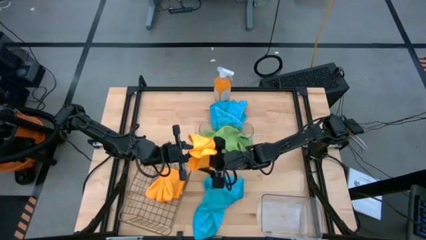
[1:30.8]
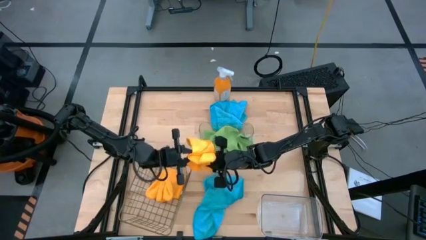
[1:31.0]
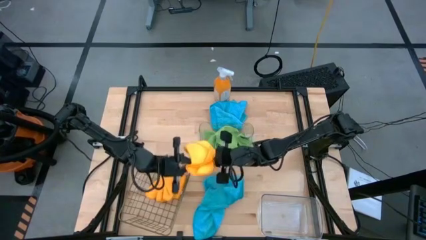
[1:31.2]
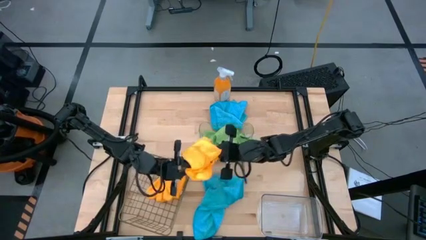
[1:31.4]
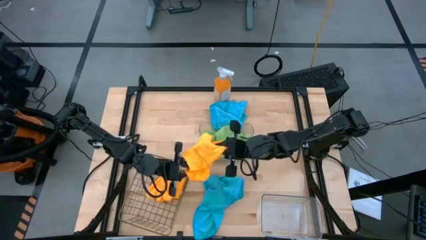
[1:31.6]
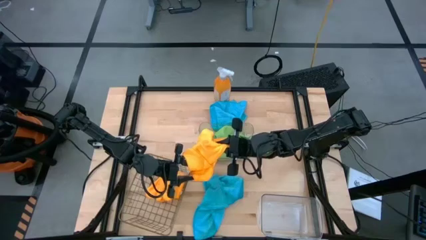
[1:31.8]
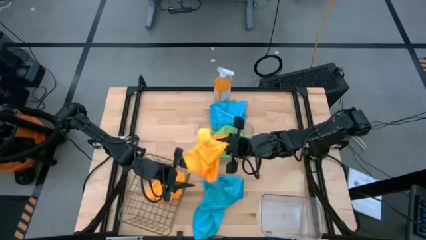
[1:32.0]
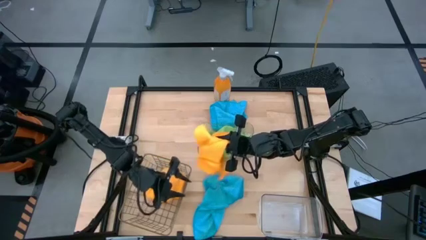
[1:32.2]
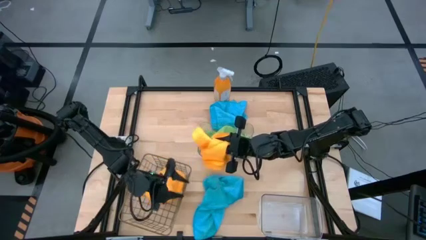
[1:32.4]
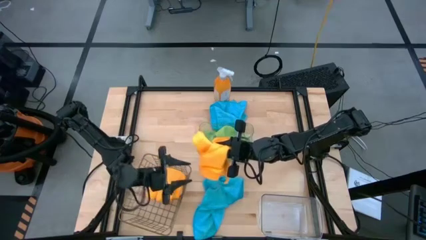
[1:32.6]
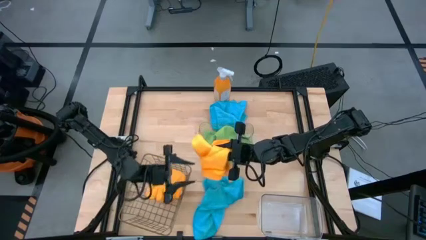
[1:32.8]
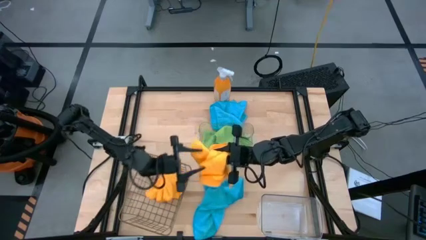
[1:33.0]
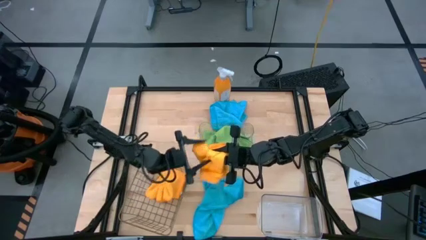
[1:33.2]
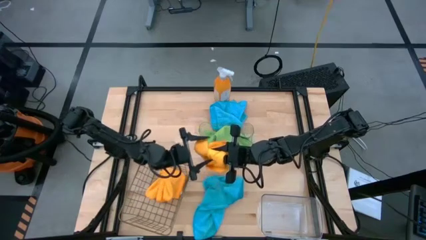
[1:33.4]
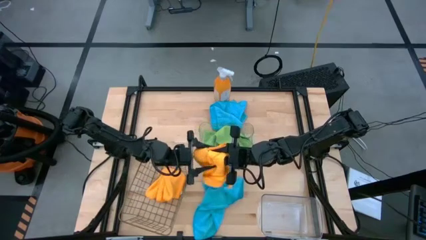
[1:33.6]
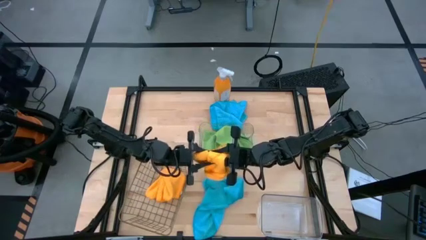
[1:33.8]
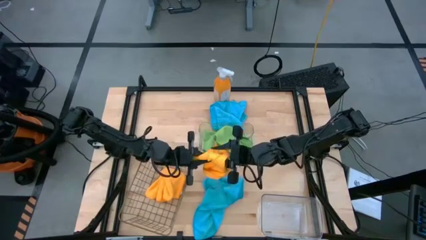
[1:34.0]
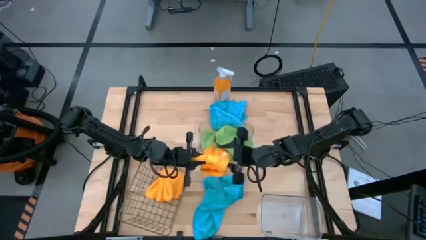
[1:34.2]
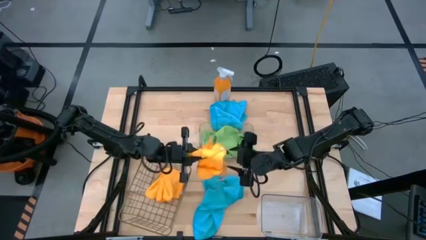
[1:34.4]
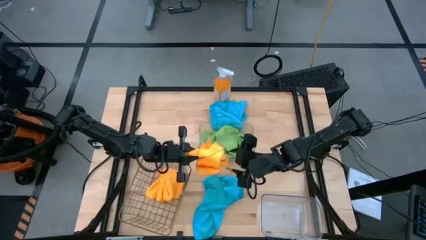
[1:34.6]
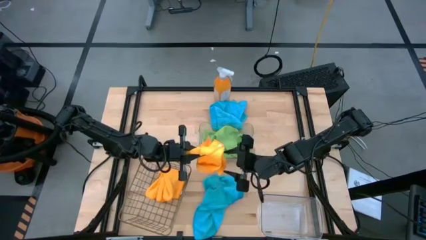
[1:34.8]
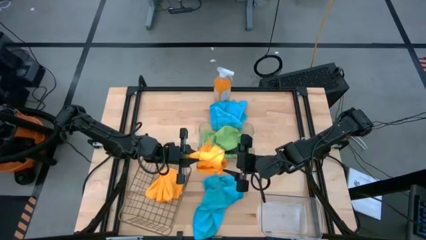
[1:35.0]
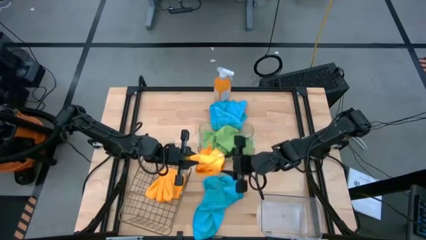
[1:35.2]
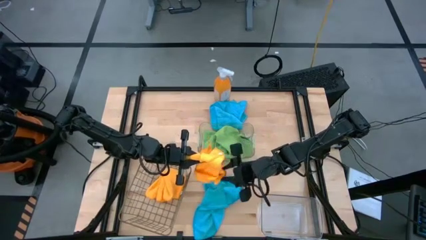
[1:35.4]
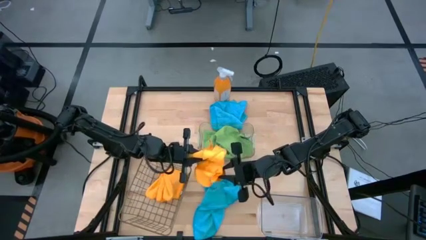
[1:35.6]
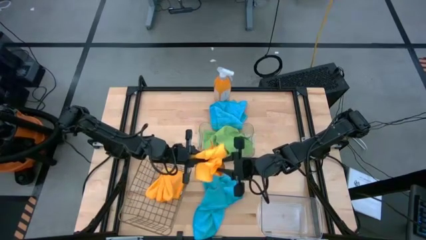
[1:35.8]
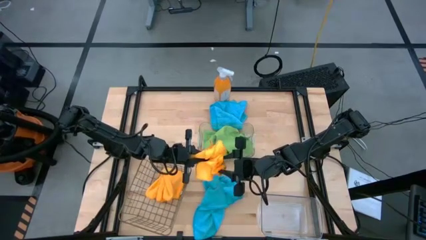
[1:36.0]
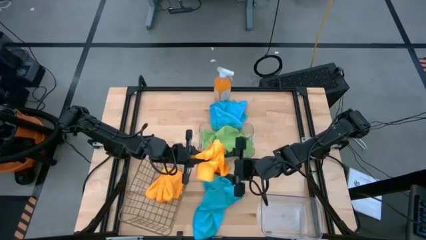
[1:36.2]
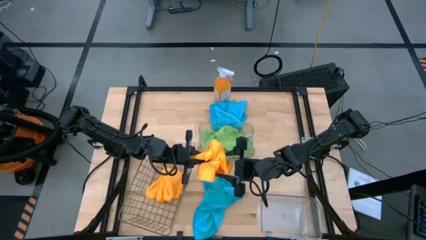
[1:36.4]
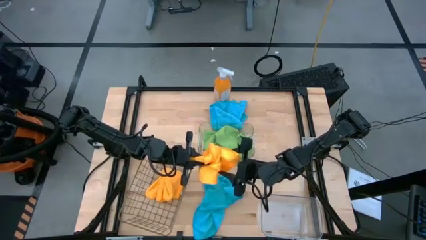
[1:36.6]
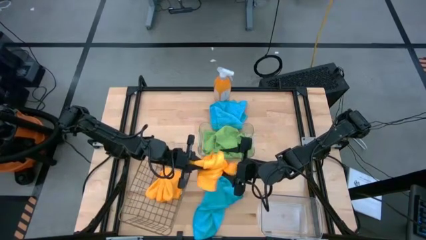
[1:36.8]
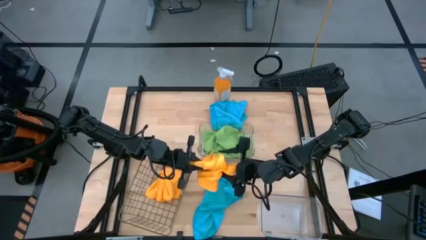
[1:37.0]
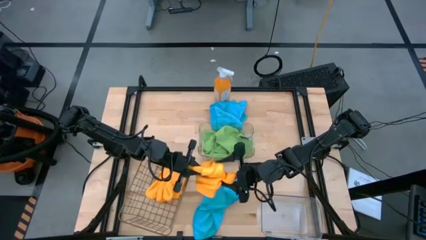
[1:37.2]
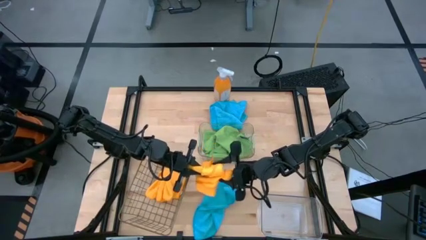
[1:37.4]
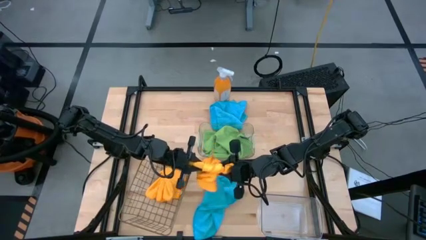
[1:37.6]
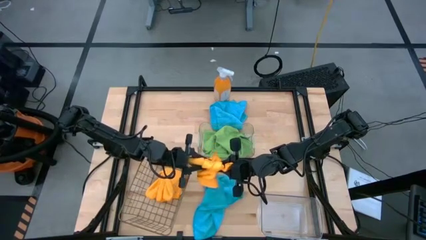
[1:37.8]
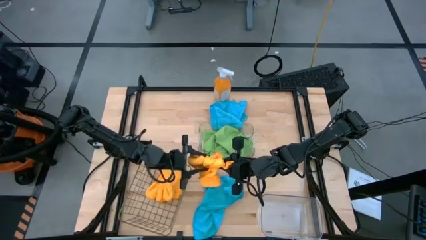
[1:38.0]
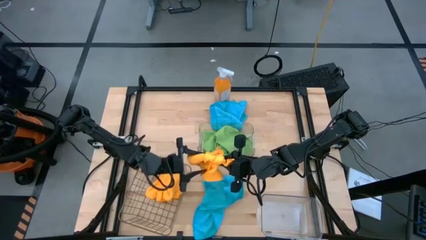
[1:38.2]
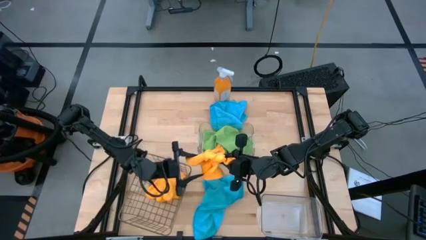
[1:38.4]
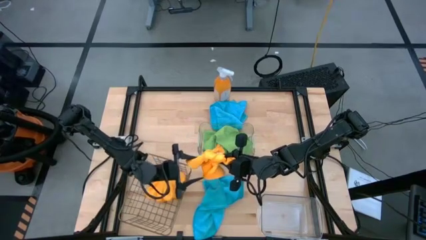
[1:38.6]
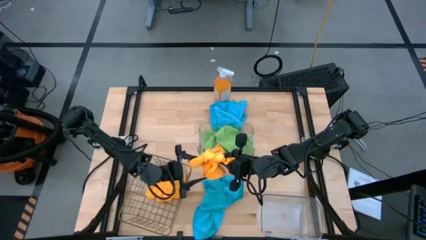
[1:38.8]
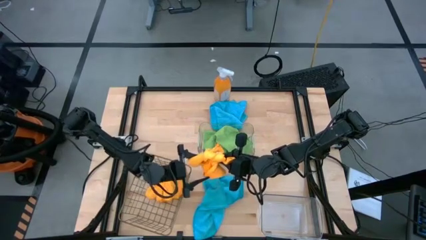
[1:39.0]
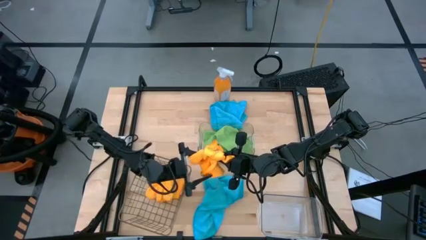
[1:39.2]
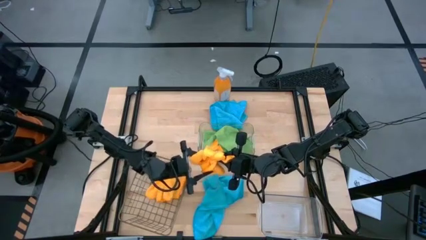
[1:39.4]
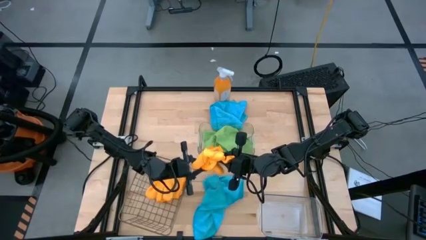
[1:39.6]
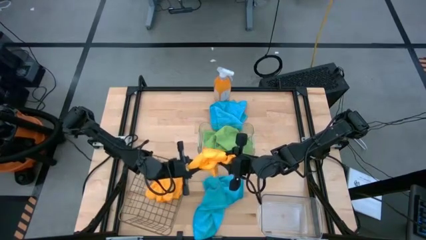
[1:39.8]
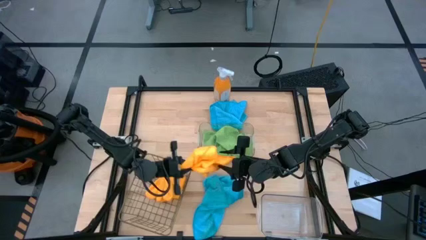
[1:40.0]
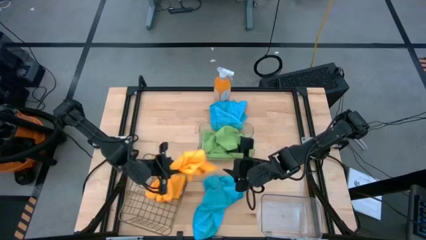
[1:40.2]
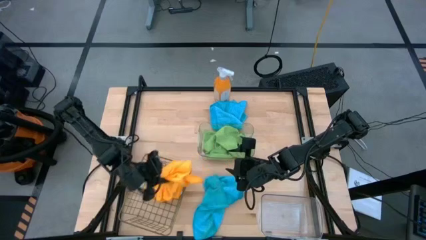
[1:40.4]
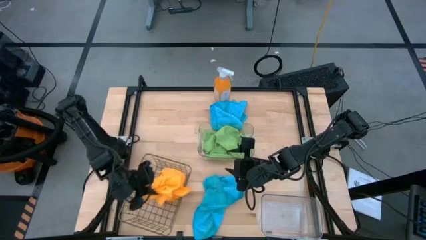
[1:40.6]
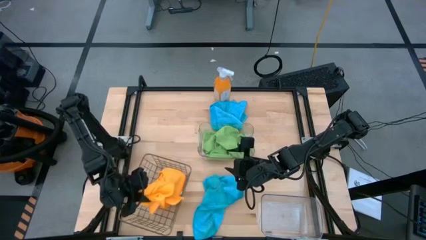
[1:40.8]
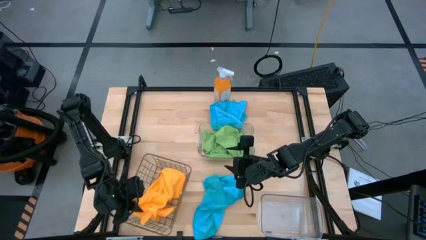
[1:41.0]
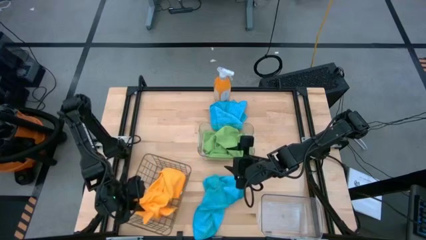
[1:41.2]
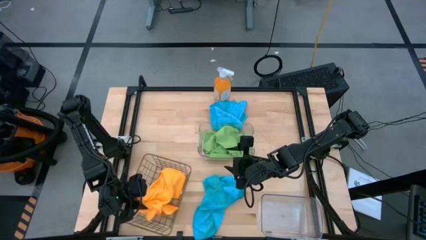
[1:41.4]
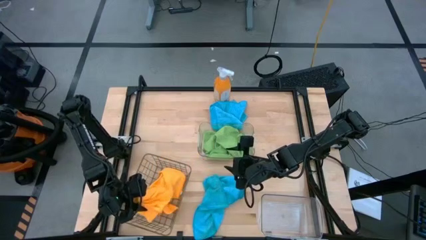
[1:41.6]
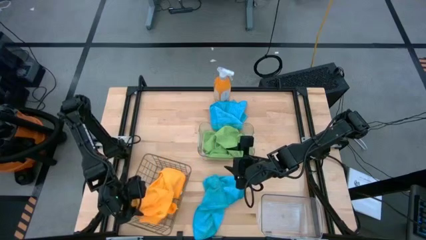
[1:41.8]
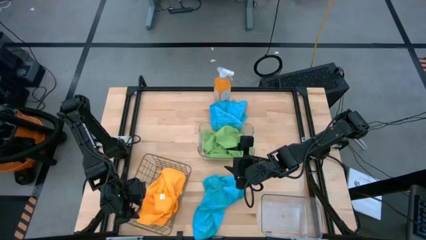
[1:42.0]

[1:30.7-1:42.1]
Task: Sort microfiber towel by color & place in baskets
Put the yellow towel into the mesh basket

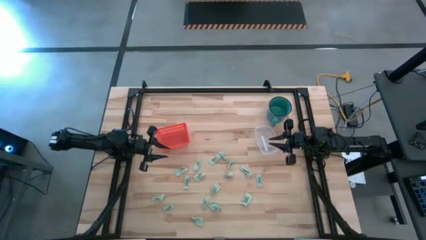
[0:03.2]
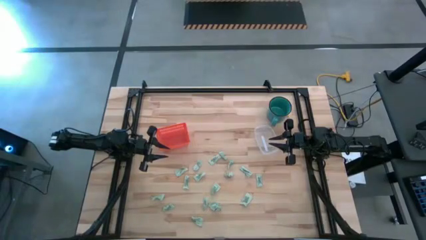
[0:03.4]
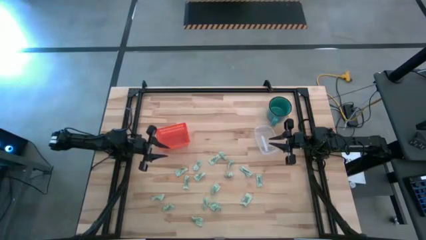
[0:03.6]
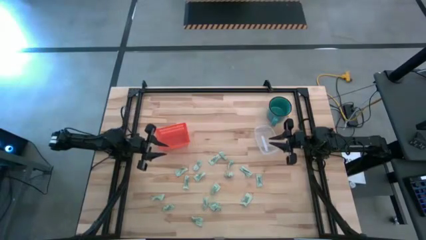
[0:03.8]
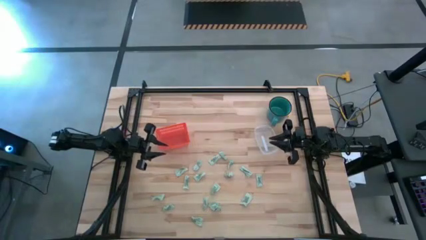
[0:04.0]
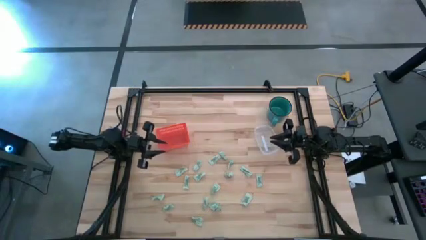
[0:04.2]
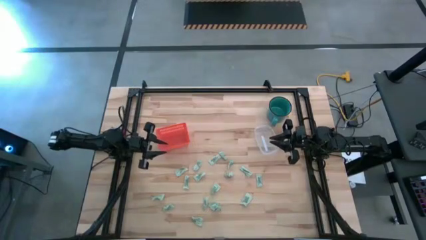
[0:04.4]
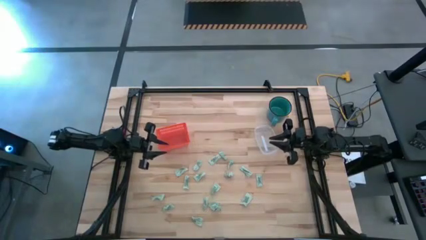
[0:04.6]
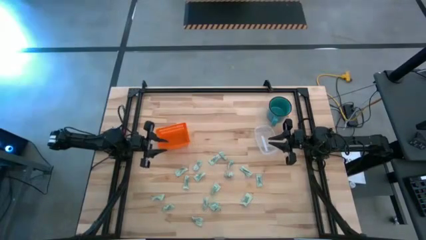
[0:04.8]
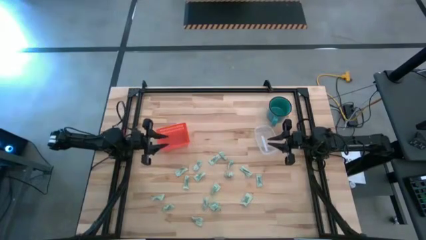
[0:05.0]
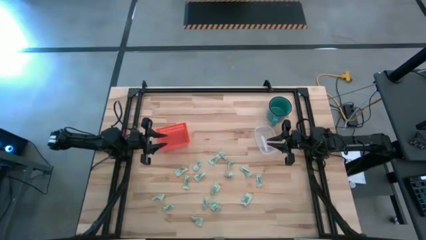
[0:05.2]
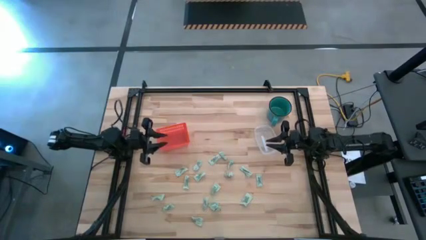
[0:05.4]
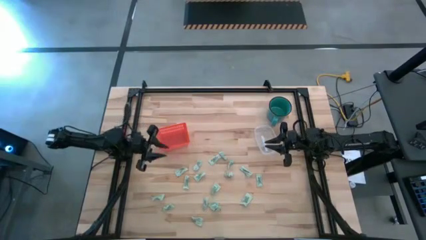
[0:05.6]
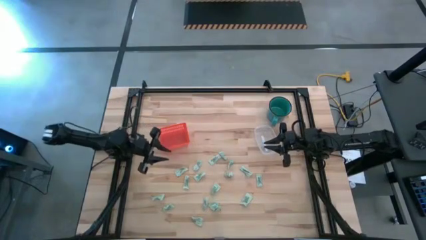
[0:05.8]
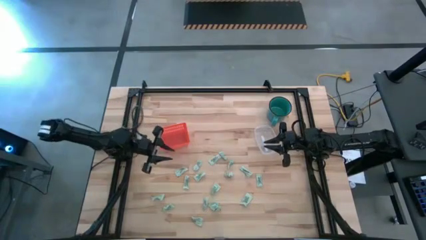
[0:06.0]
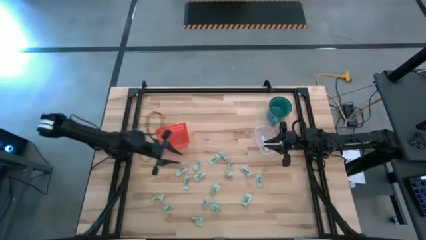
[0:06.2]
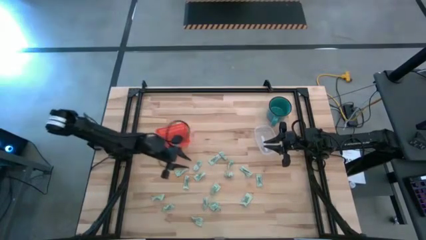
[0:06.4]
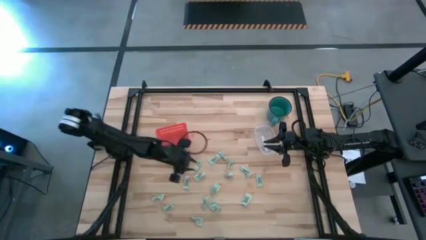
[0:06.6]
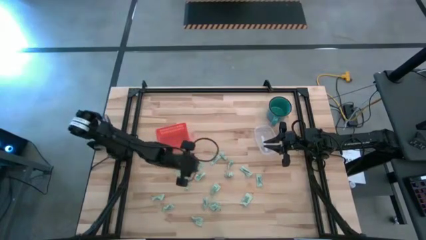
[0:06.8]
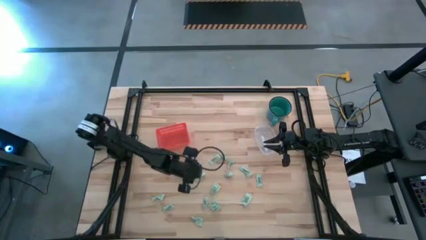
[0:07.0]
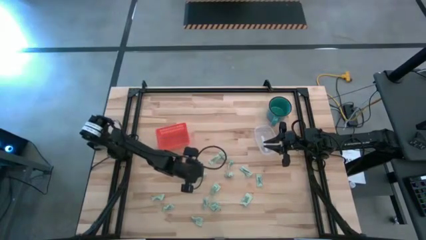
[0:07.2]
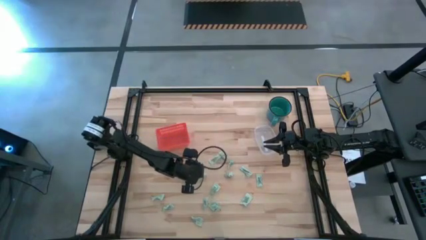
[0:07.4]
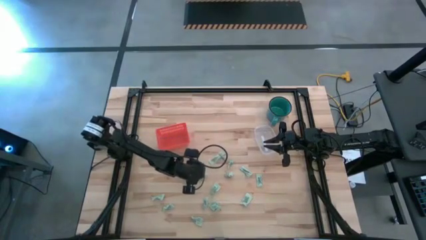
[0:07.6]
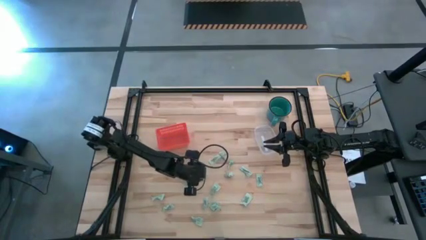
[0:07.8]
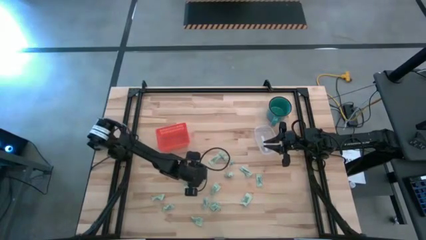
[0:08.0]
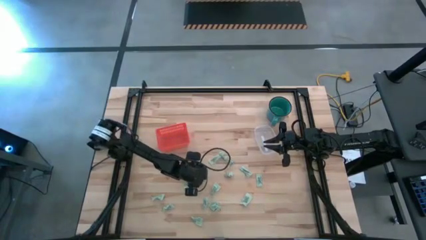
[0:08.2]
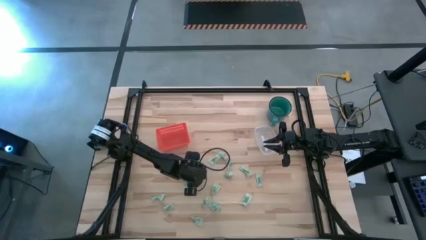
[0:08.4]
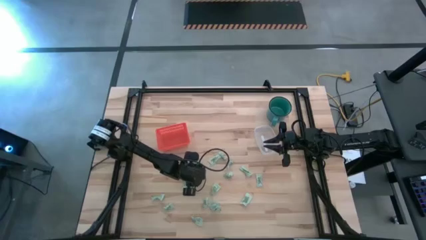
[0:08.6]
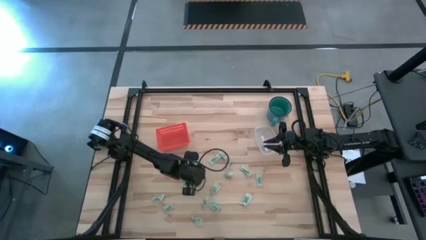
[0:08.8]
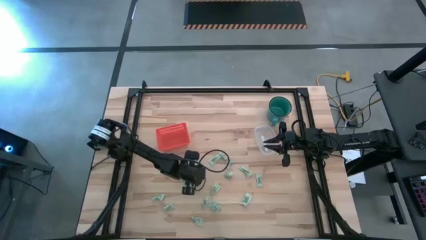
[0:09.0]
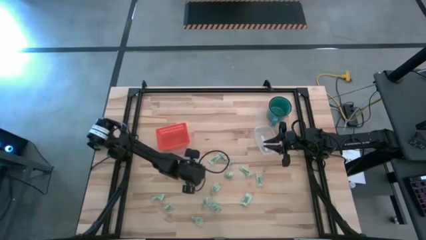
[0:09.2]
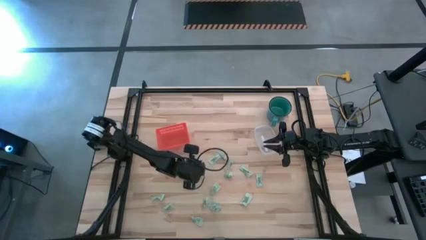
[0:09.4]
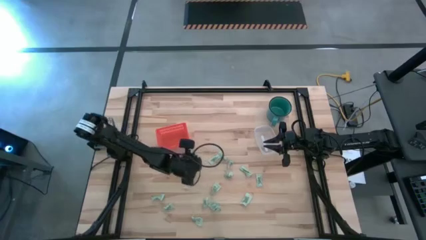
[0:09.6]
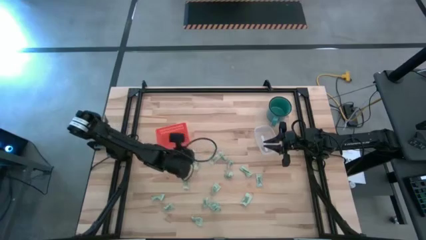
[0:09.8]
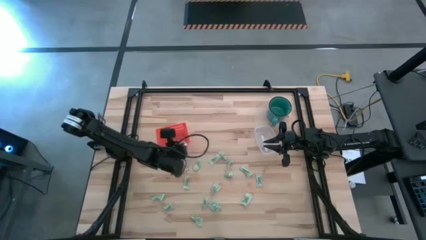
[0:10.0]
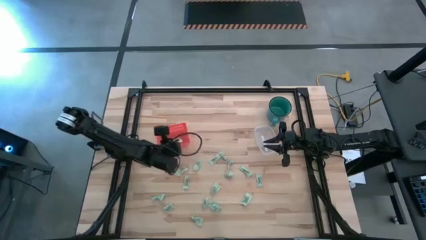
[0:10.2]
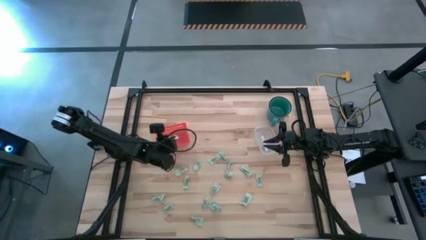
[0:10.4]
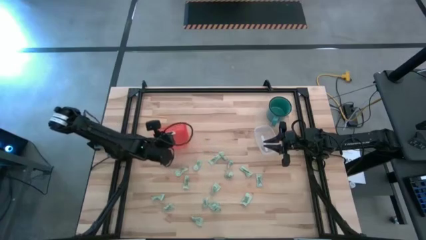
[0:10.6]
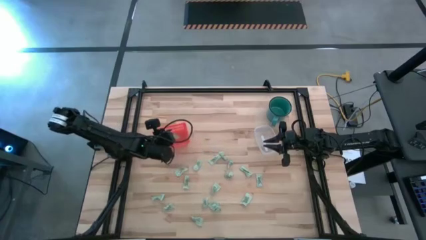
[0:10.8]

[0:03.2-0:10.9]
Task: Pick and place items into bin
Put the stevia packet into the orange bin
